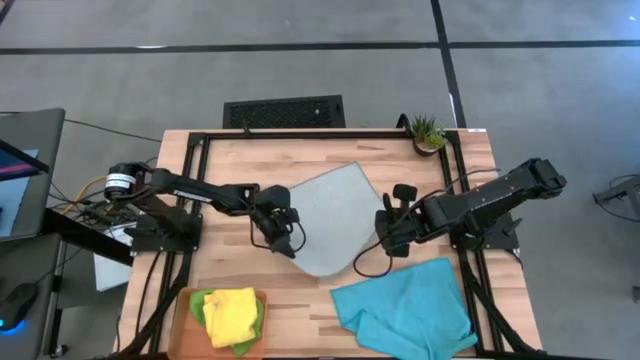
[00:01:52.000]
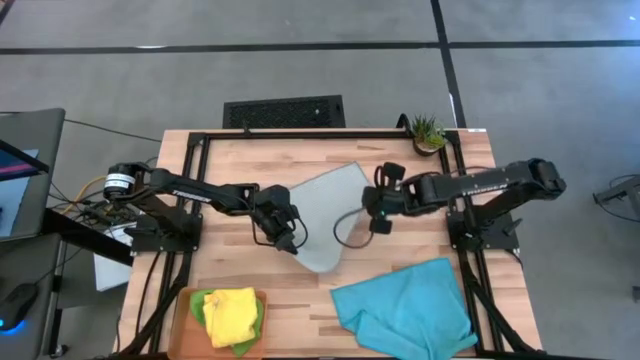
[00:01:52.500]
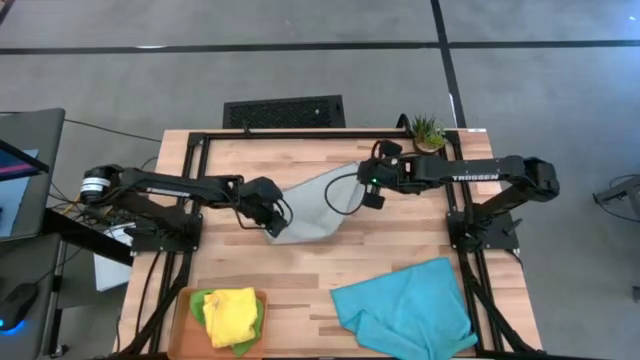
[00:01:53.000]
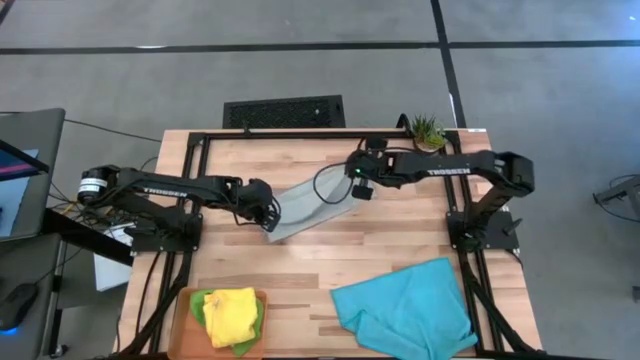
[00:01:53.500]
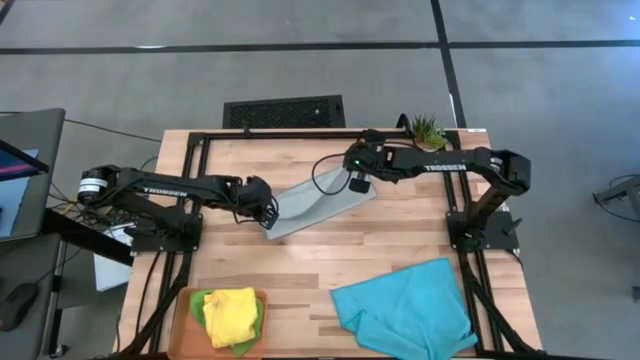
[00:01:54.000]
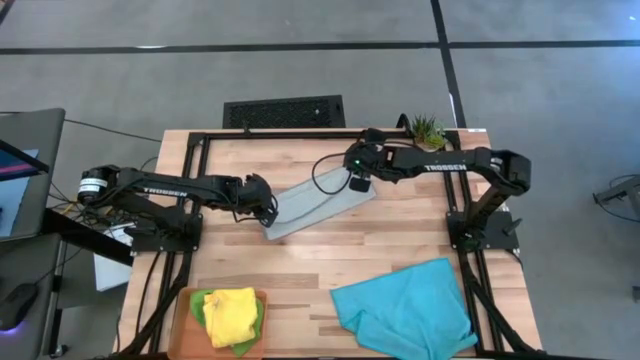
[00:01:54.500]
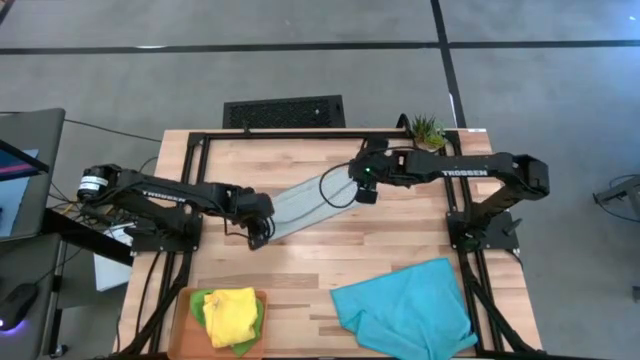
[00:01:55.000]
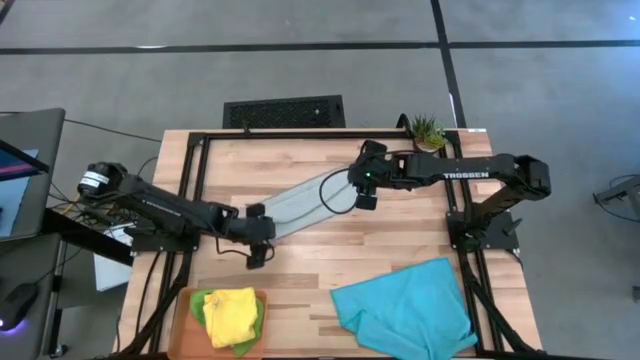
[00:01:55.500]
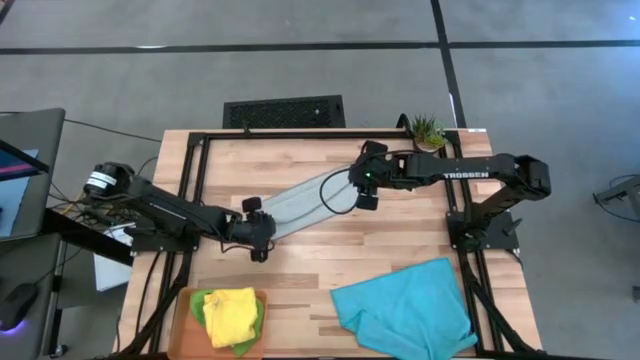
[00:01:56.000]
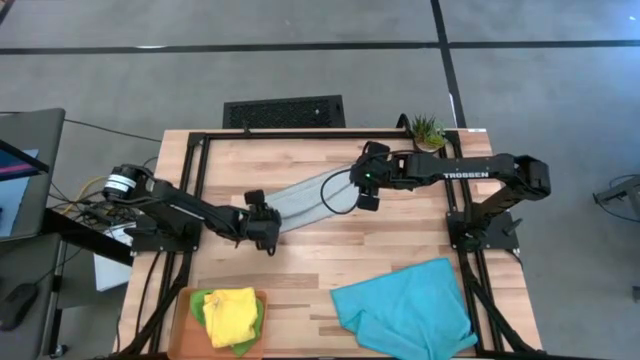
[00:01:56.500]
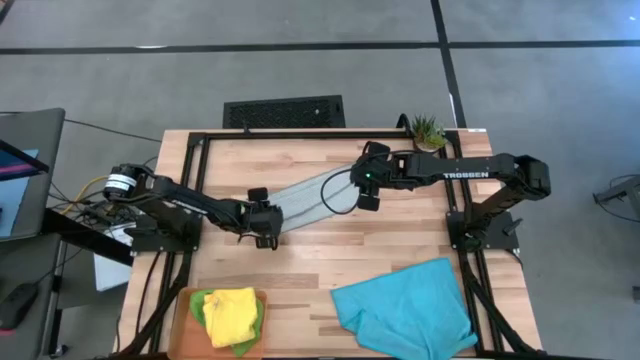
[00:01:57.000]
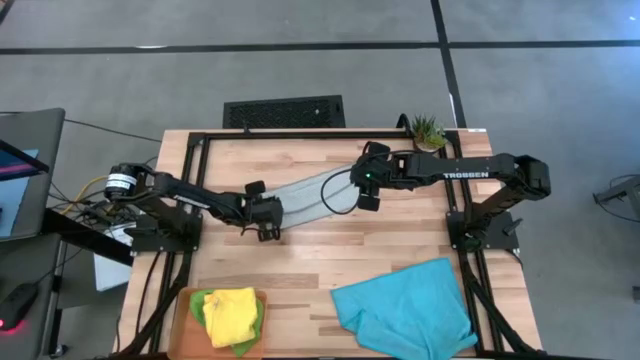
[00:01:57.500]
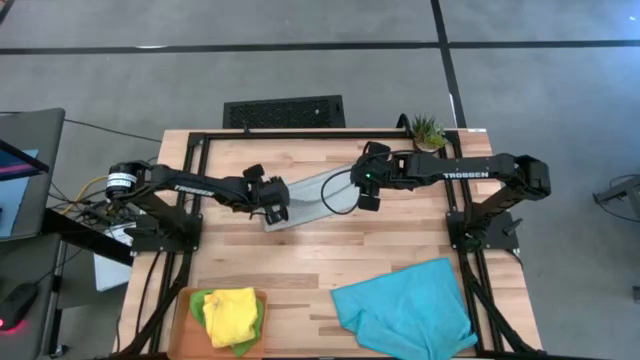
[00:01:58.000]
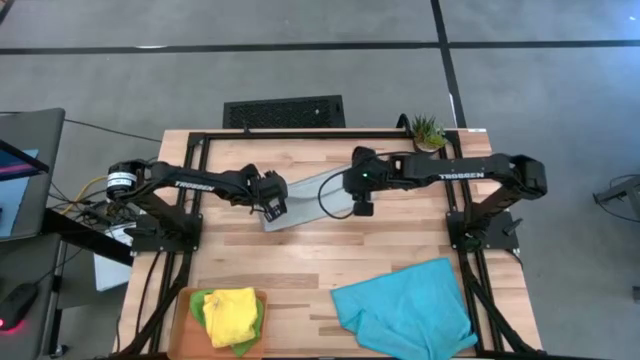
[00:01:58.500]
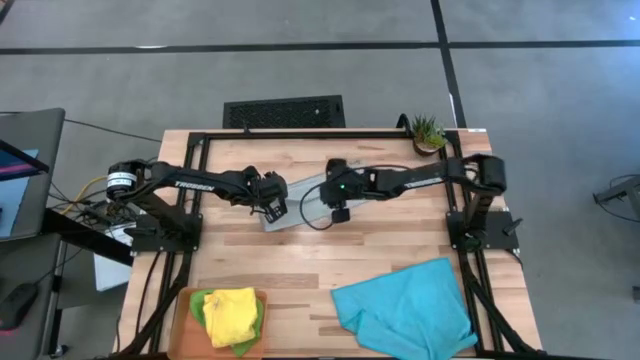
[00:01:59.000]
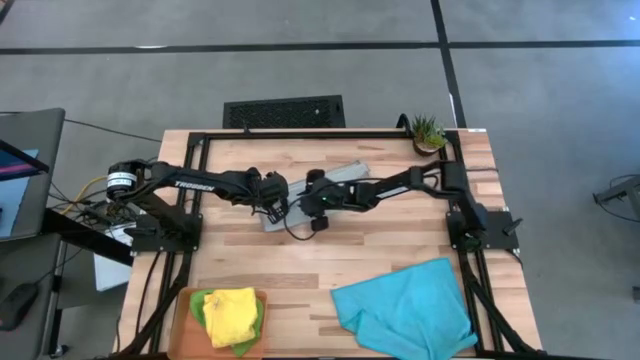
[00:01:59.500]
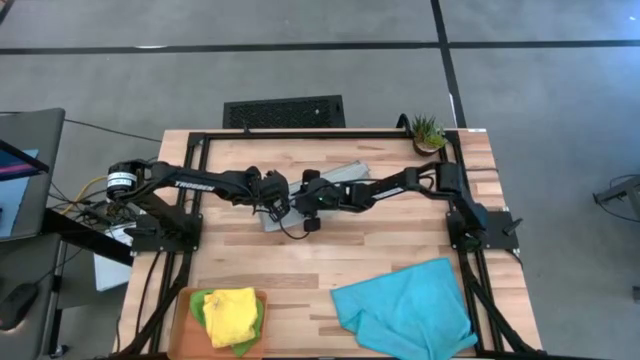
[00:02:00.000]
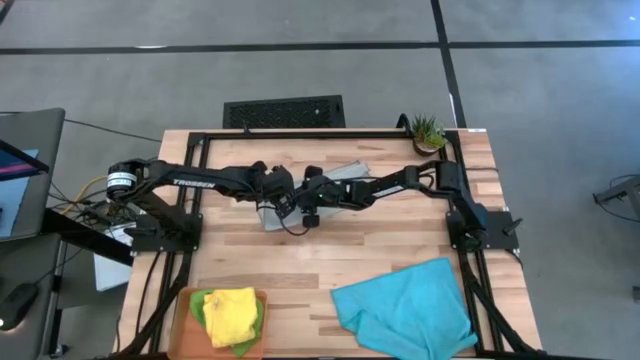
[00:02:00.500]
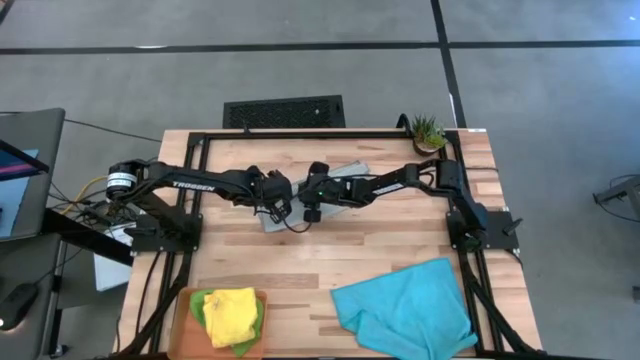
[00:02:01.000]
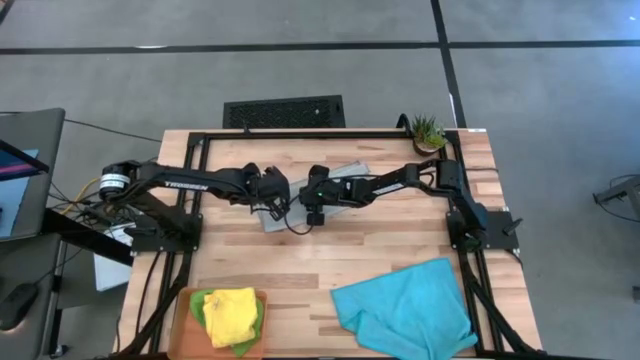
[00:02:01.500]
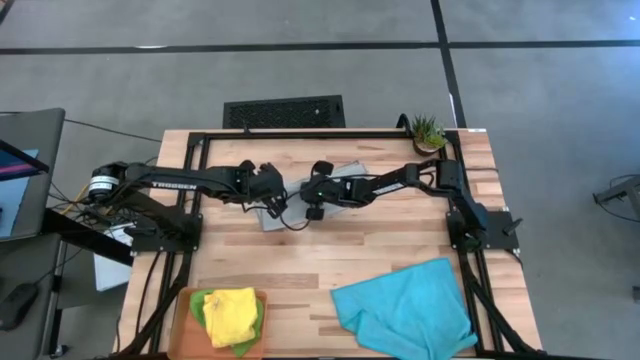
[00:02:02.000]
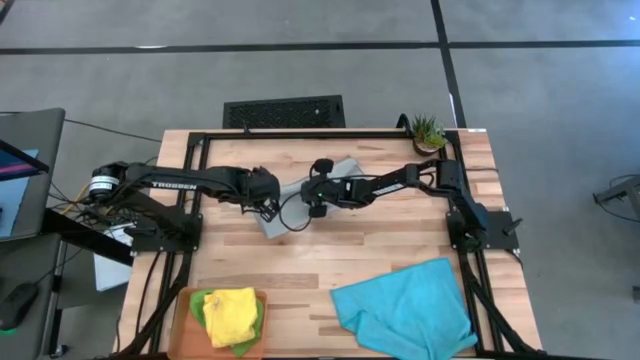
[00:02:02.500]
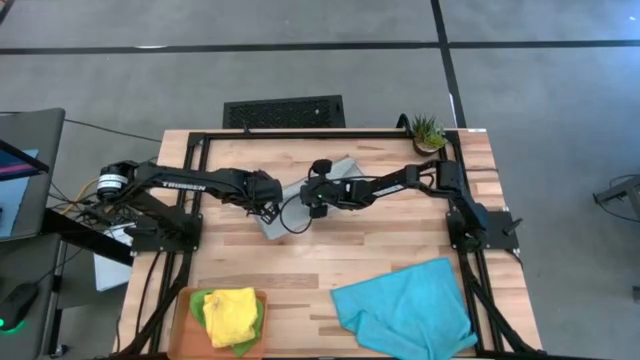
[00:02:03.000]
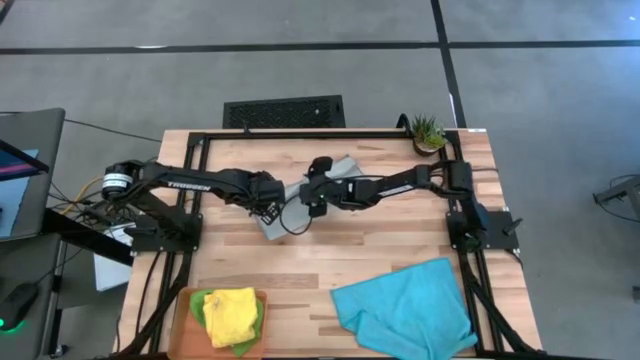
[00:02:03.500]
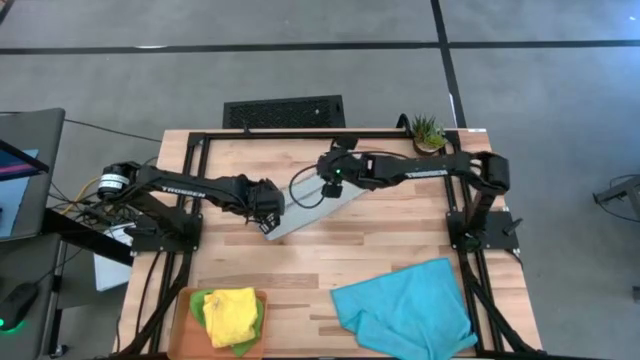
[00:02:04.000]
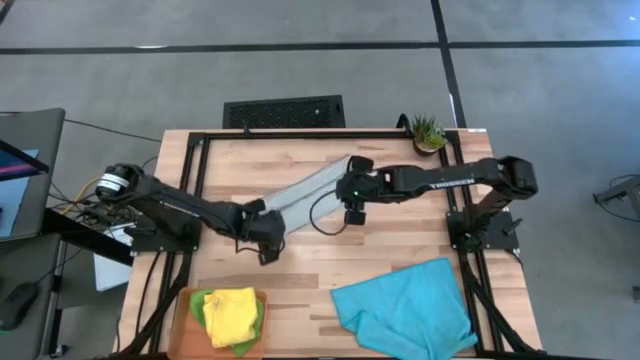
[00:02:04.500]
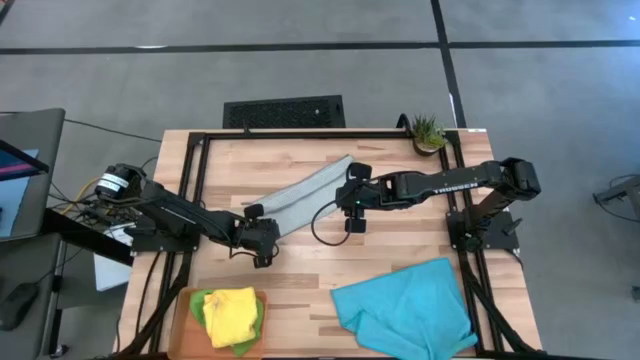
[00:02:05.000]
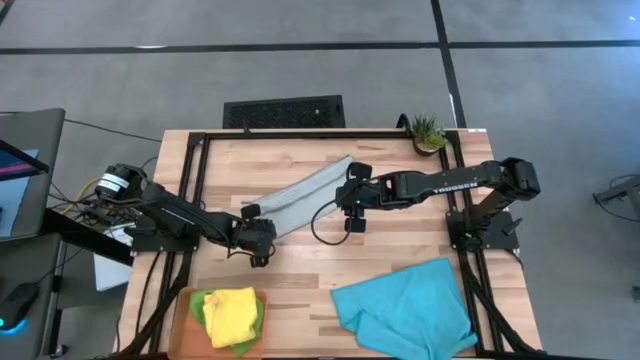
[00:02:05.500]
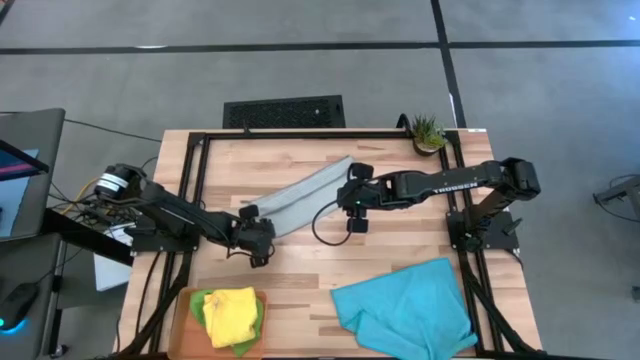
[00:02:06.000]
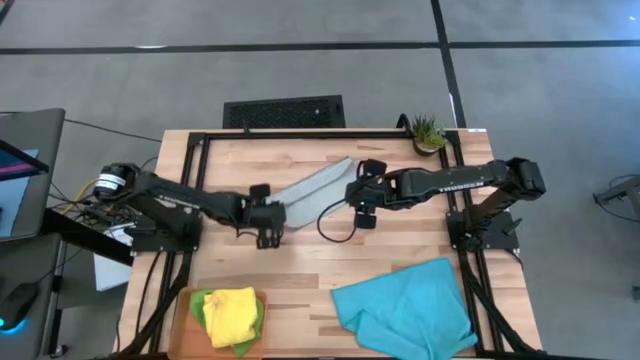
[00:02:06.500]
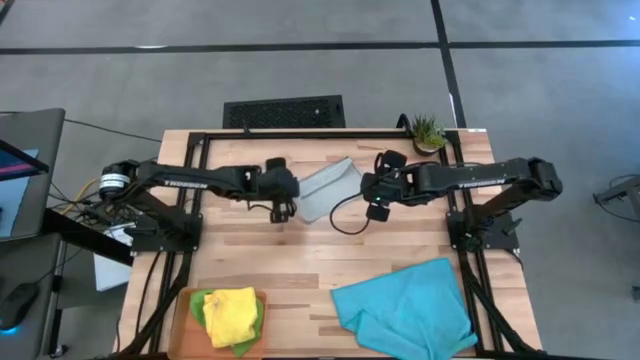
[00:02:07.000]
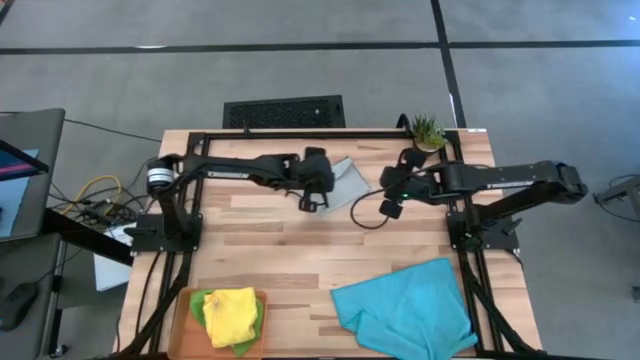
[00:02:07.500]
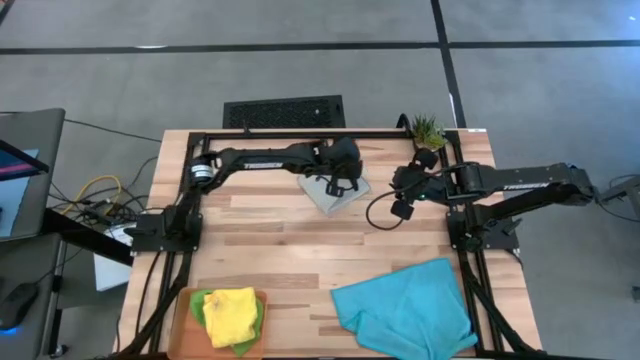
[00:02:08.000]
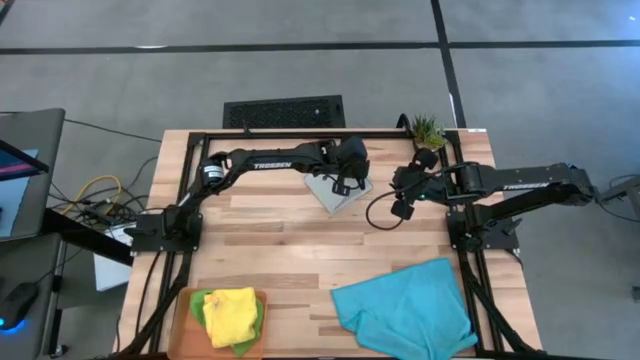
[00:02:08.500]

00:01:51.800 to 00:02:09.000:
Task: Fold microfiber towels
Fold the gray towel
